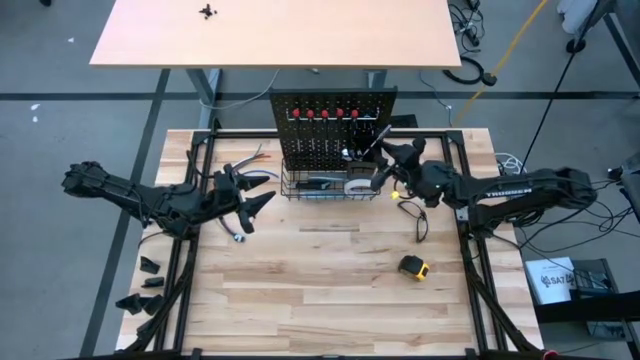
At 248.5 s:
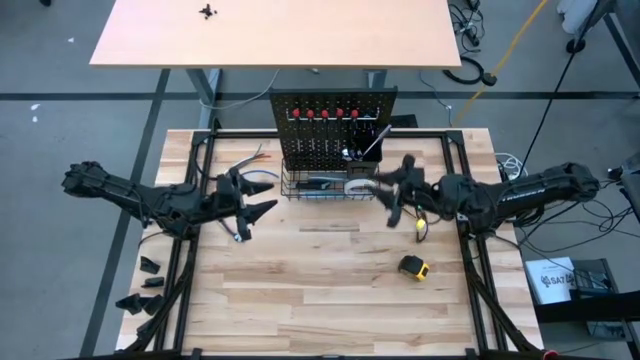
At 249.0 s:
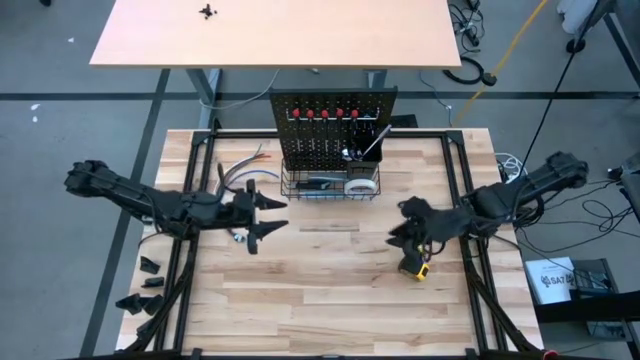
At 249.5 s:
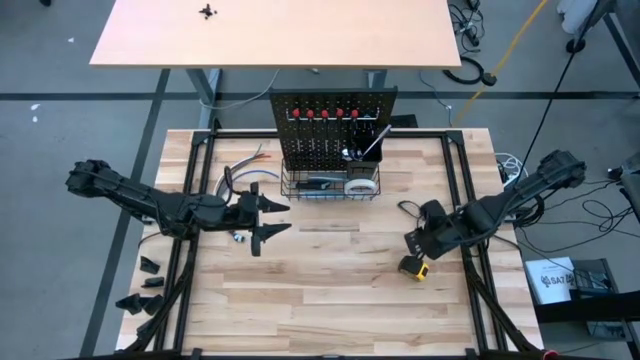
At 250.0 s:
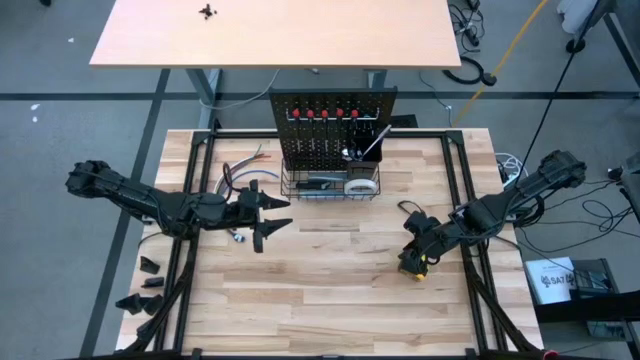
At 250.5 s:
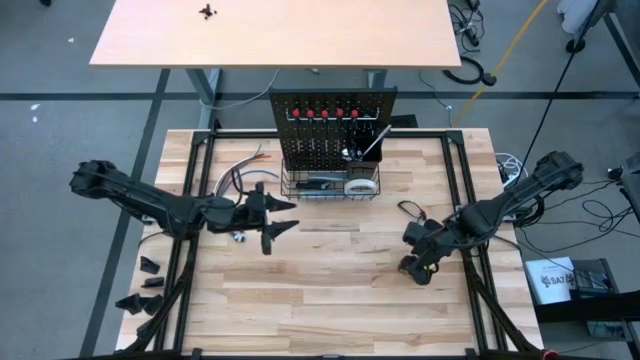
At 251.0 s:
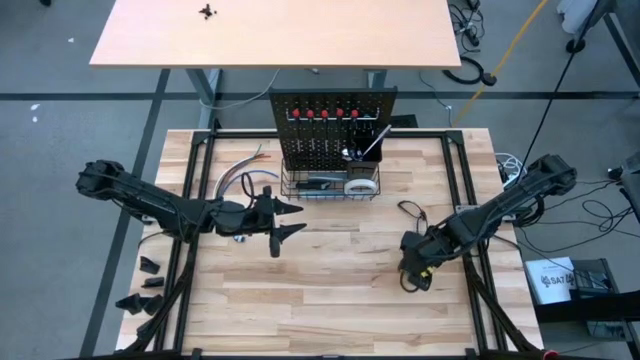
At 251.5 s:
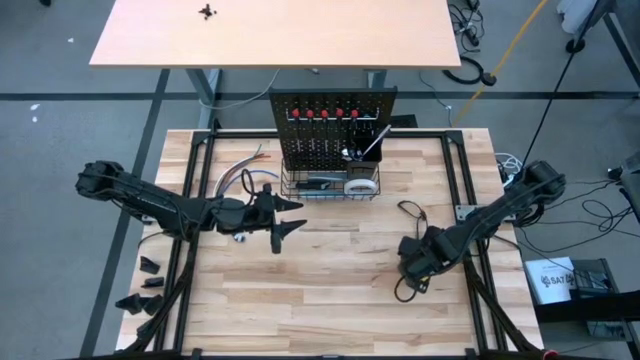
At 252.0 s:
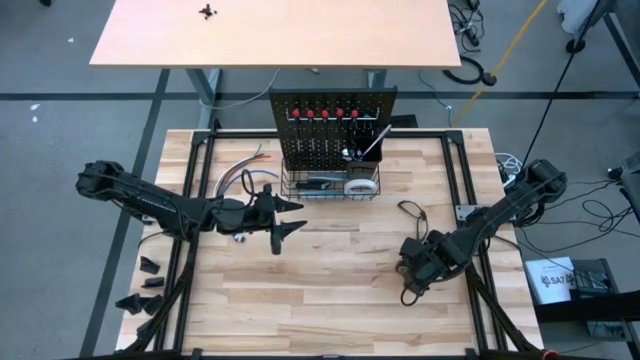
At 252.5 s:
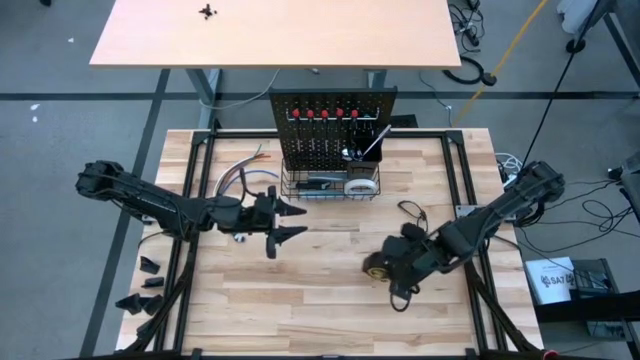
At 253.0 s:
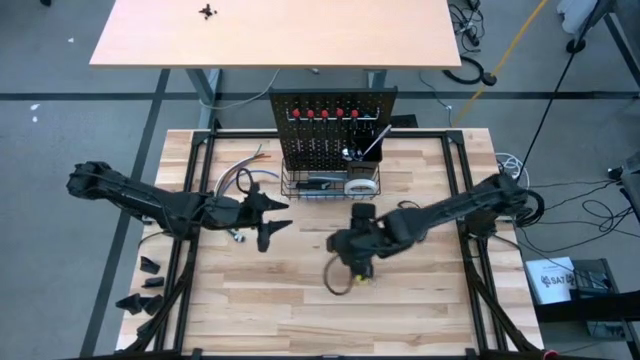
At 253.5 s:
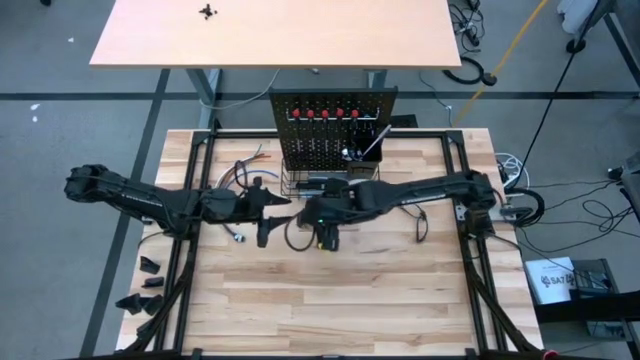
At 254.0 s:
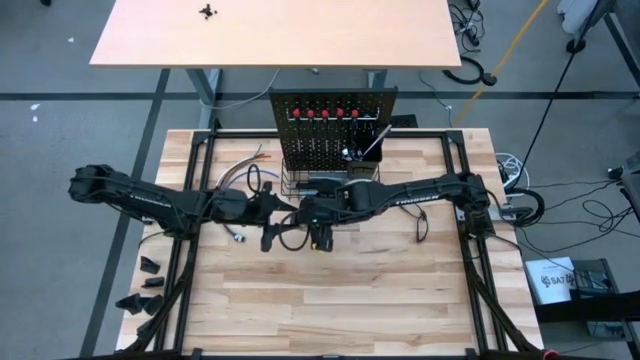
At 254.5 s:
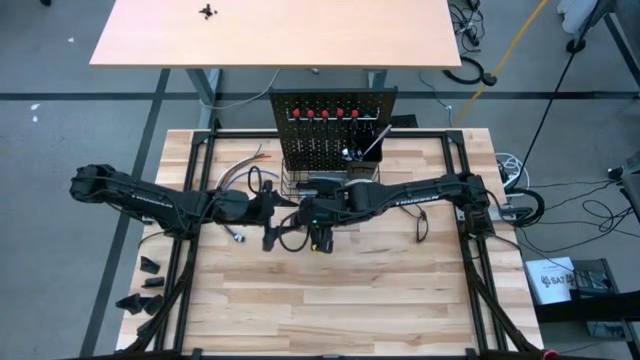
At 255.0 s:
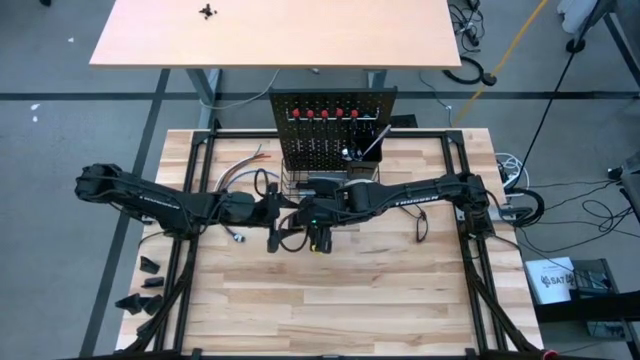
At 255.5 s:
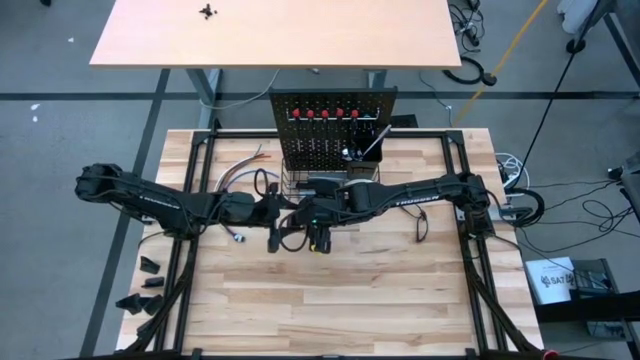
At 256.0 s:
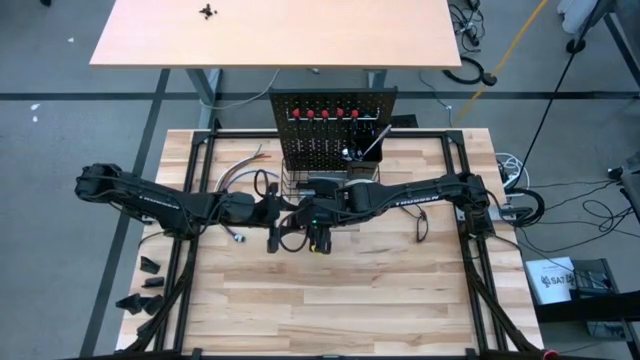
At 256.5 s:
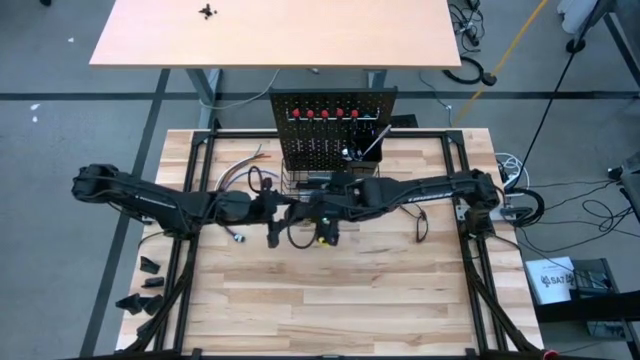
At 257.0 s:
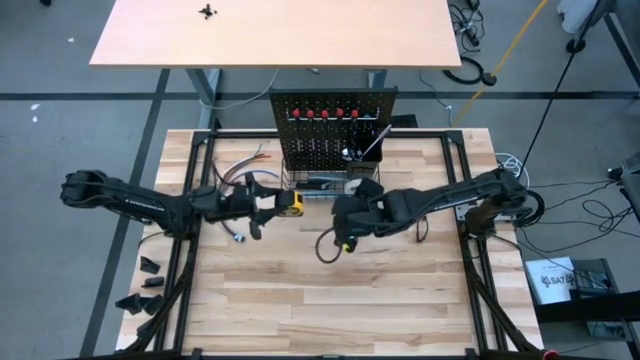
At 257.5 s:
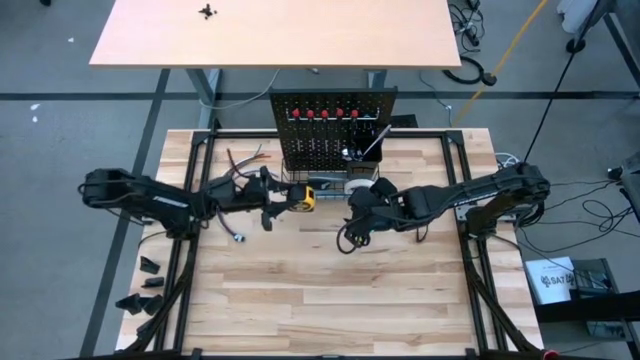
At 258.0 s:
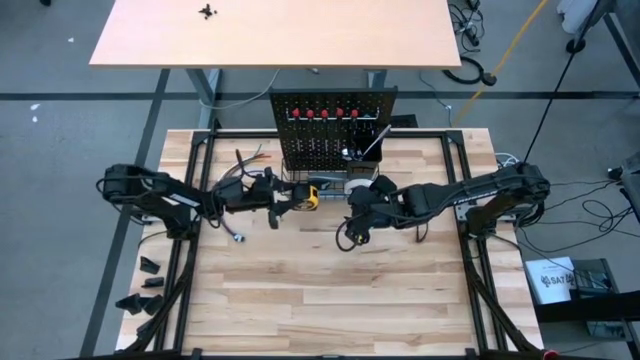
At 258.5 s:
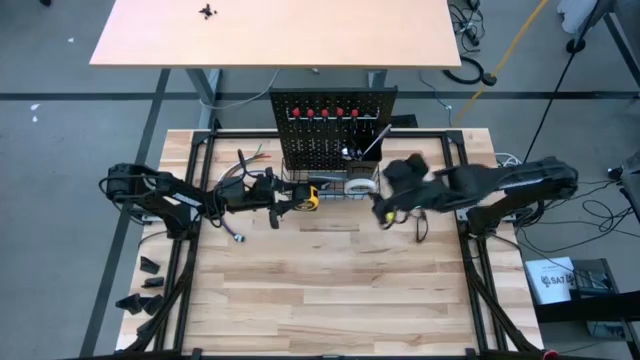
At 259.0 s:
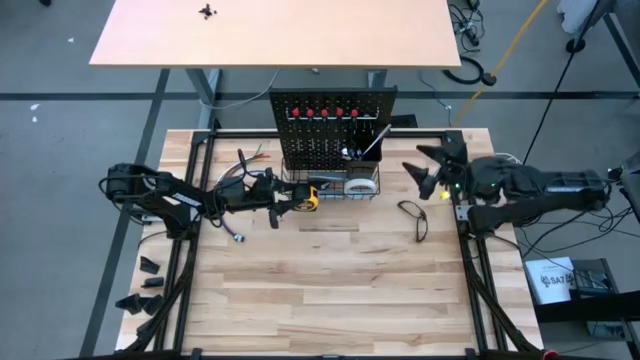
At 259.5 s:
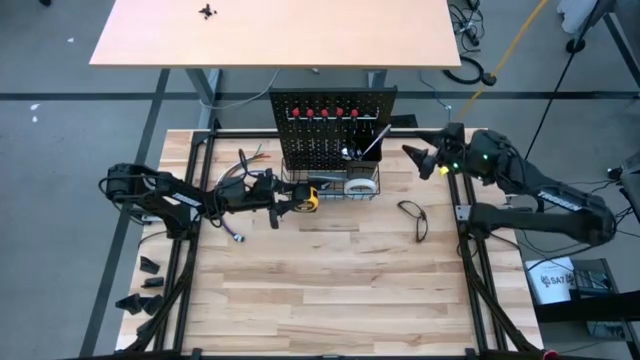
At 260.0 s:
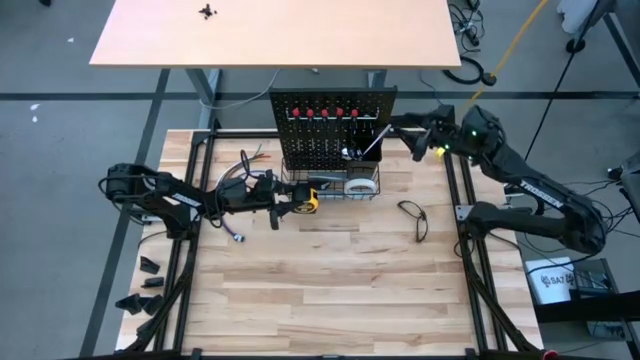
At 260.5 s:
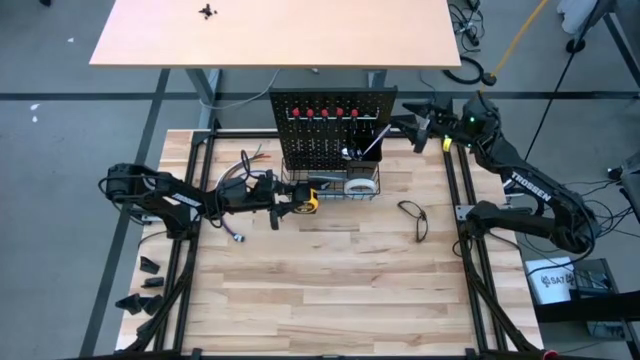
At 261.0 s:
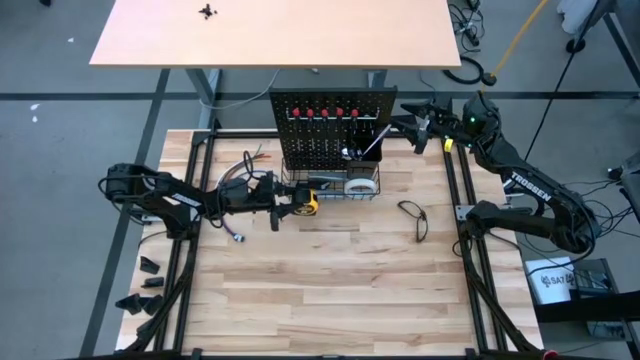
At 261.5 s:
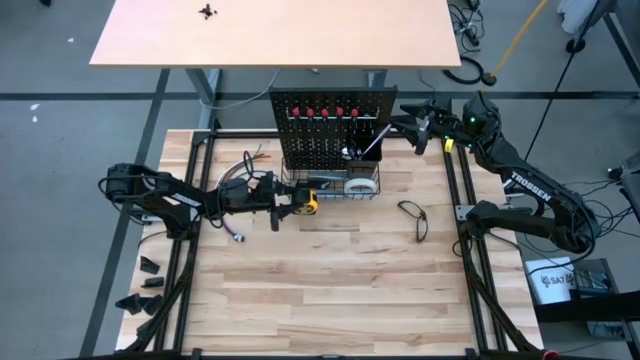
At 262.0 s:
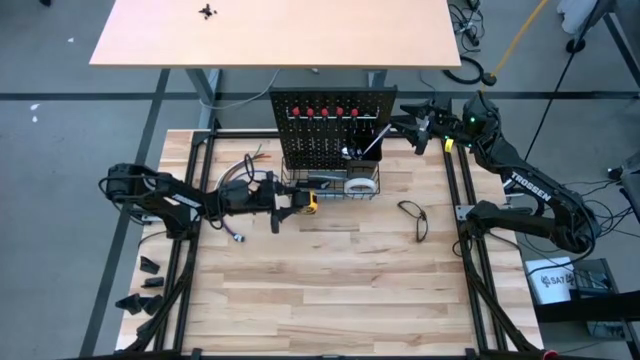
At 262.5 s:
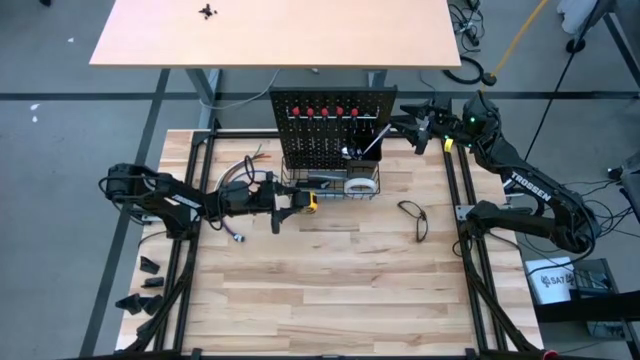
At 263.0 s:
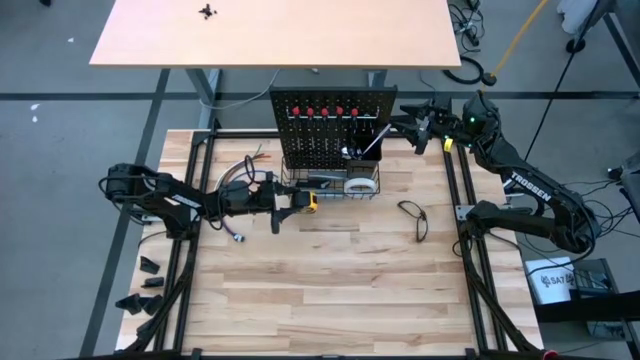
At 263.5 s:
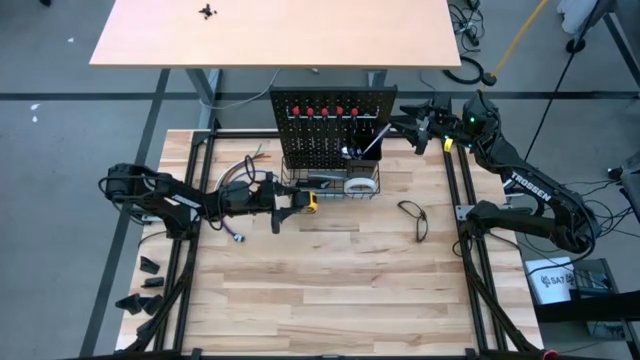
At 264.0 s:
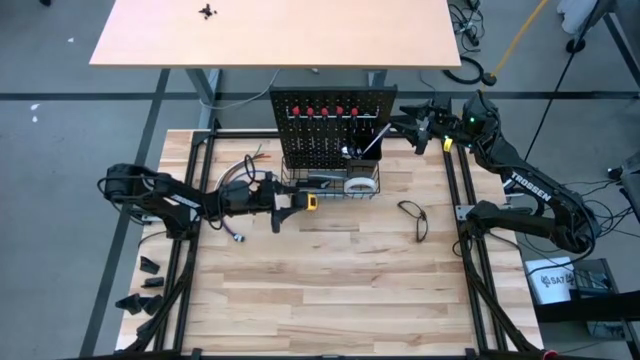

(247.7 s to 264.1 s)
Task: Hang tools onto peg board
Hang the measuring tape into the pegboard basket

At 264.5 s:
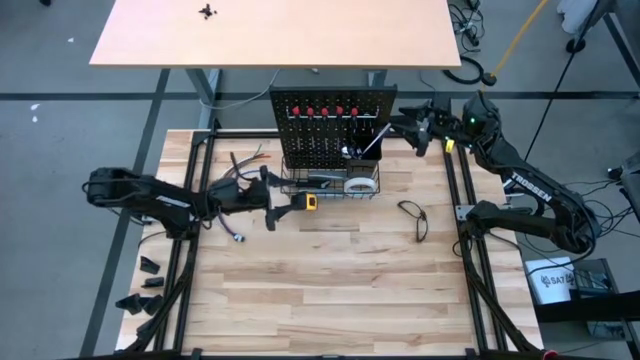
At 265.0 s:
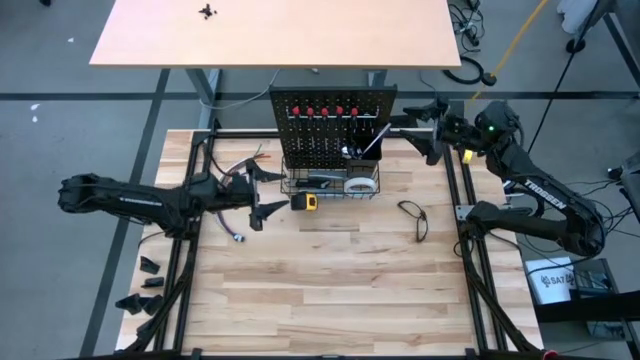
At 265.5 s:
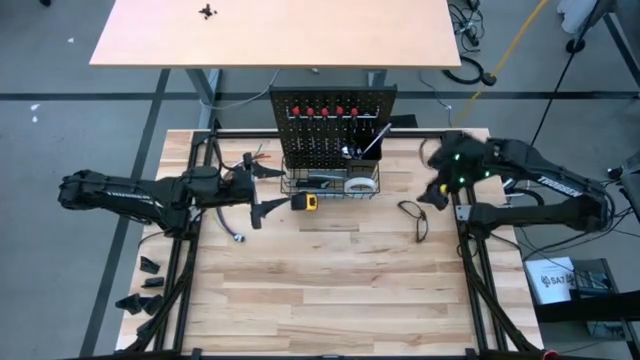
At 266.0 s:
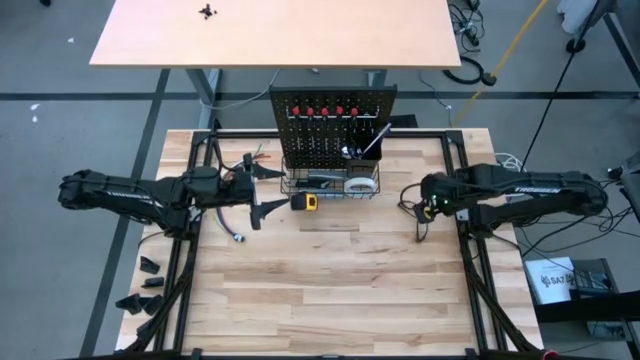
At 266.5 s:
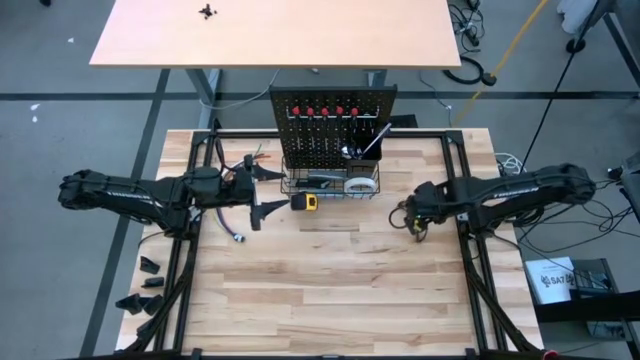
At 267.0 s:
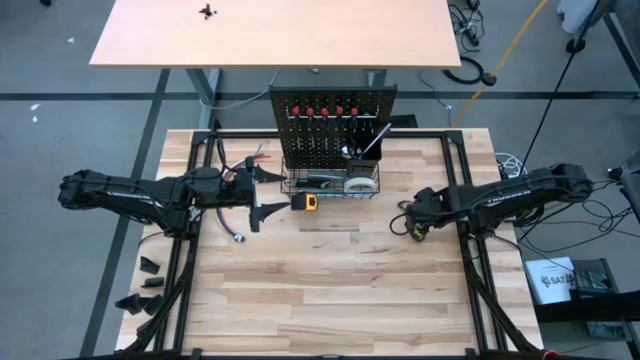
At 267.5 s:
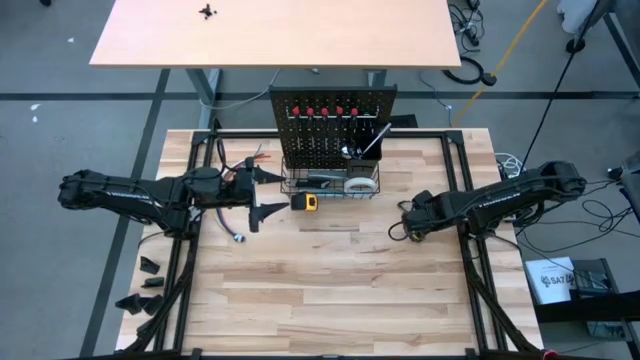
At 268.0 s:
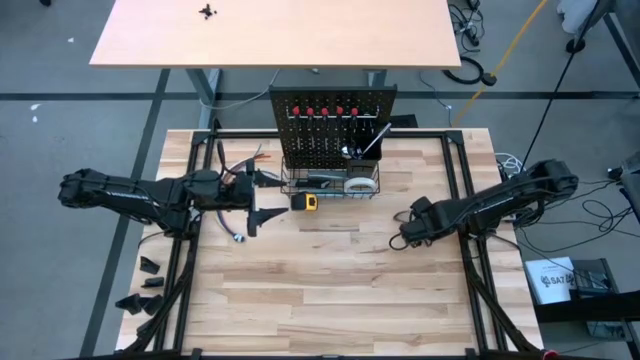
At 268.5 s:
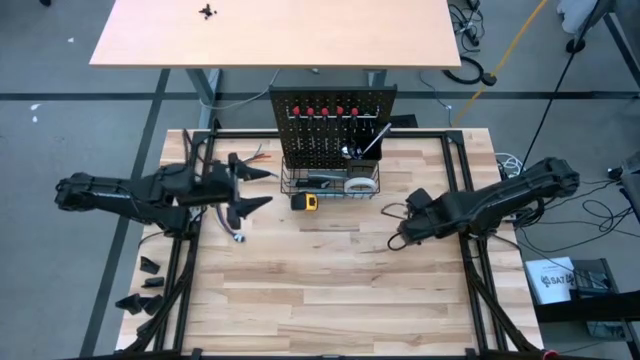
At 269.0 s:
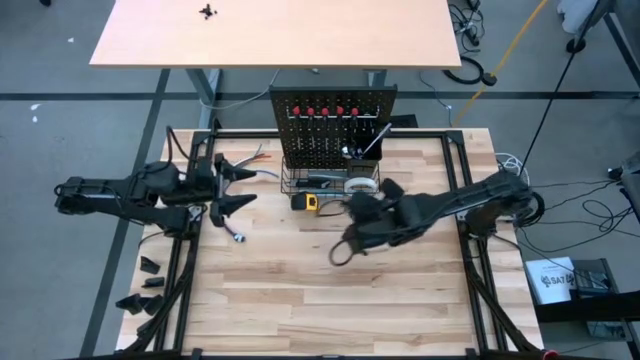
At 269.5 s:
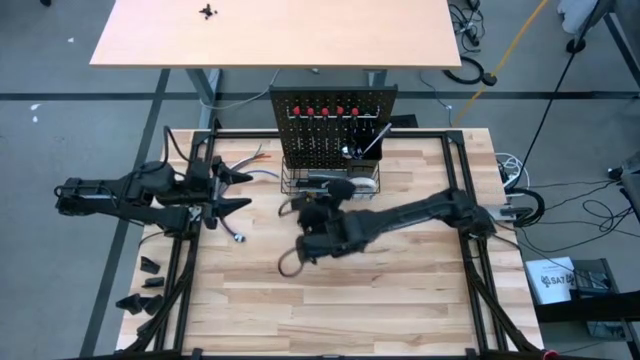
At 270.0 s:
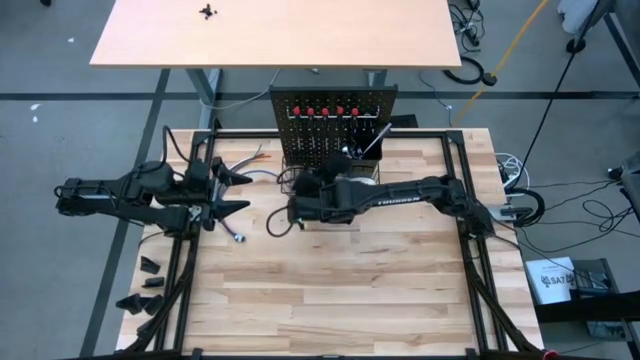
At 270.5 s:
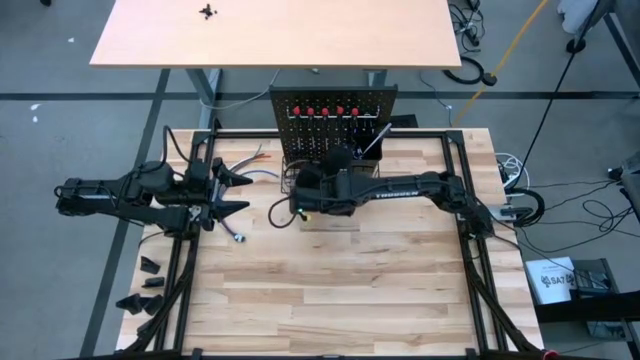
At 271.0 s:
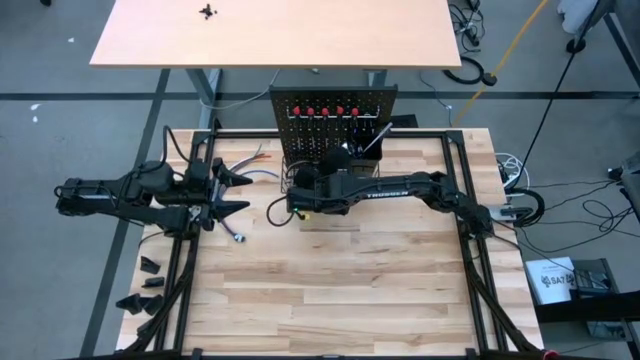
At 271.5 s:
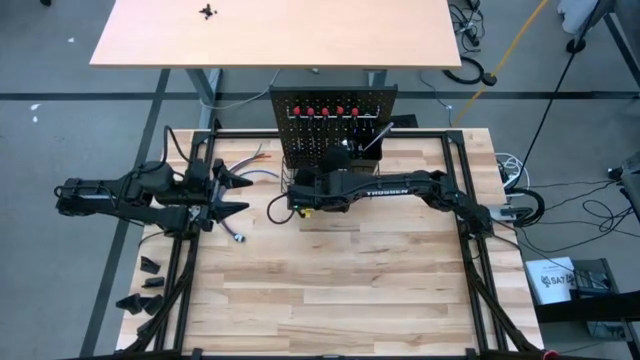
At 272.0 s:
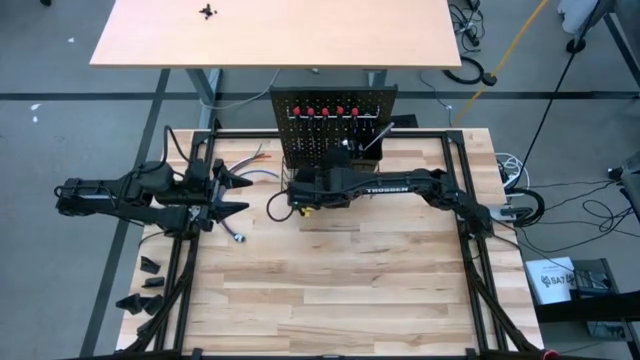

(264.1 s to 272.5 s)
Put the safety goggles into the pegboard basket
